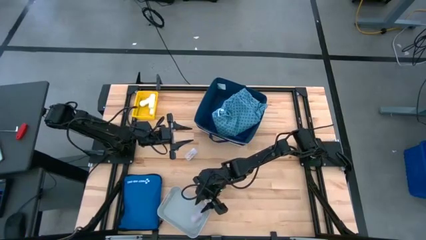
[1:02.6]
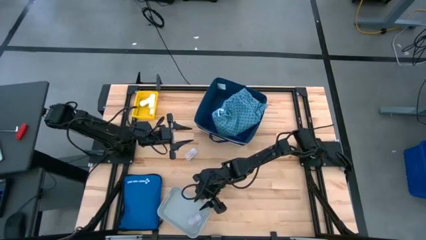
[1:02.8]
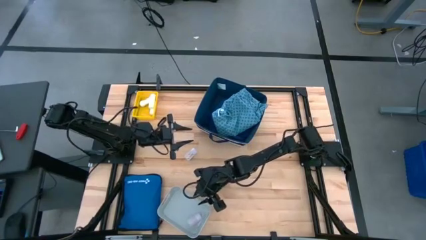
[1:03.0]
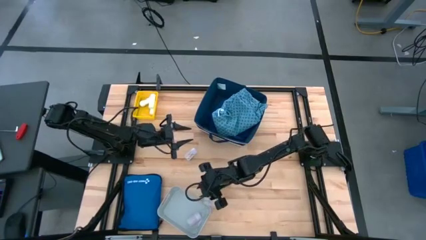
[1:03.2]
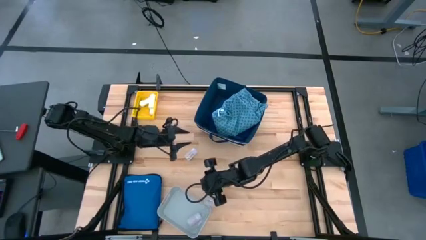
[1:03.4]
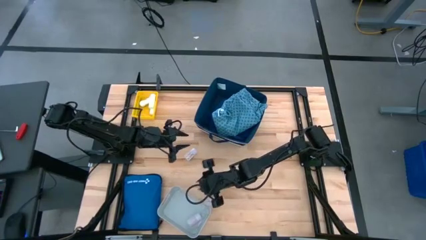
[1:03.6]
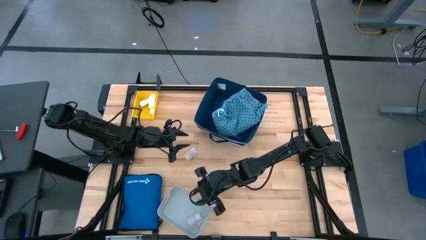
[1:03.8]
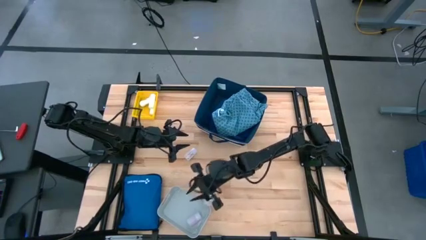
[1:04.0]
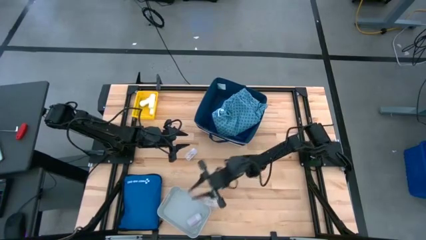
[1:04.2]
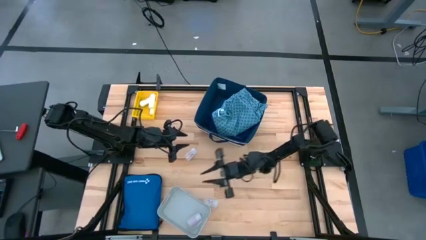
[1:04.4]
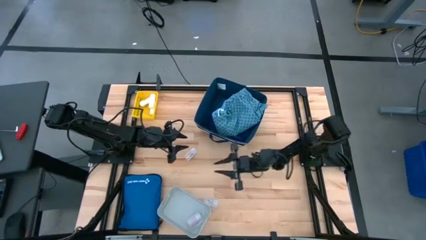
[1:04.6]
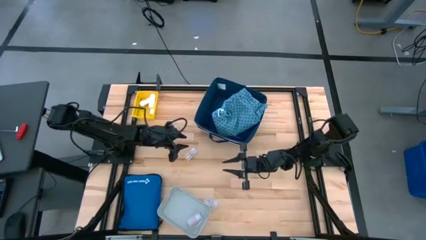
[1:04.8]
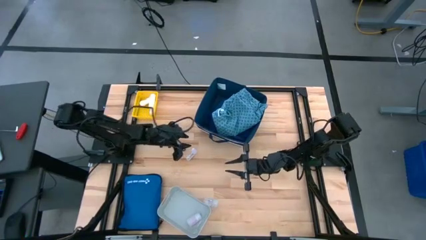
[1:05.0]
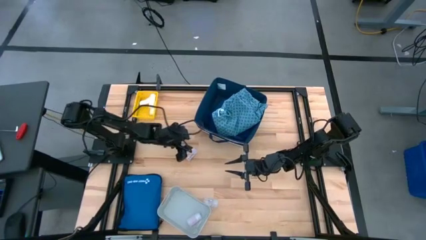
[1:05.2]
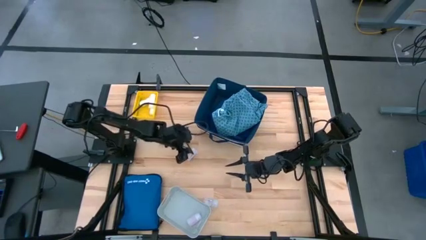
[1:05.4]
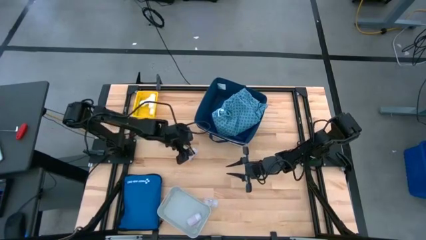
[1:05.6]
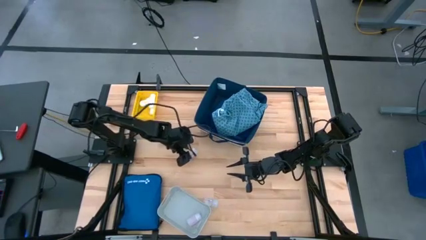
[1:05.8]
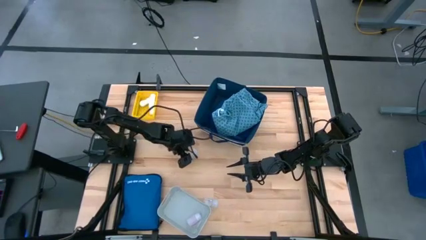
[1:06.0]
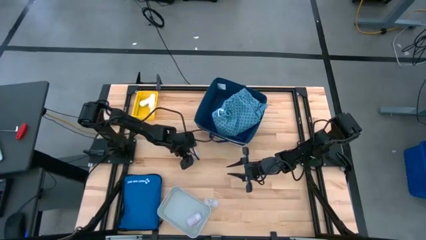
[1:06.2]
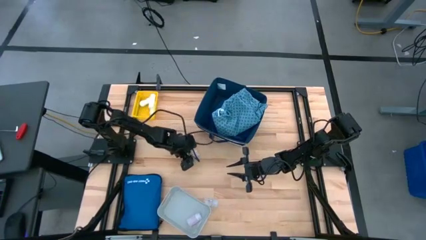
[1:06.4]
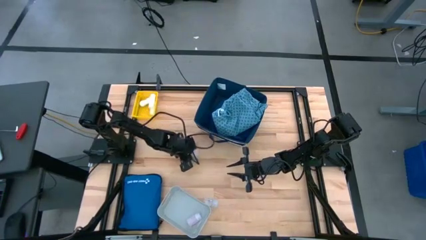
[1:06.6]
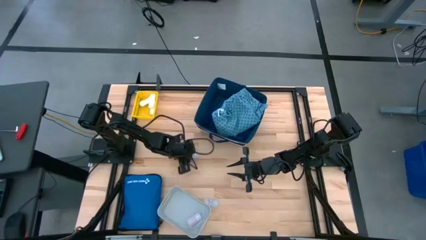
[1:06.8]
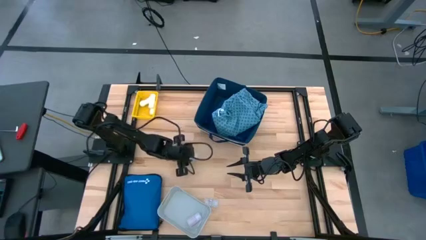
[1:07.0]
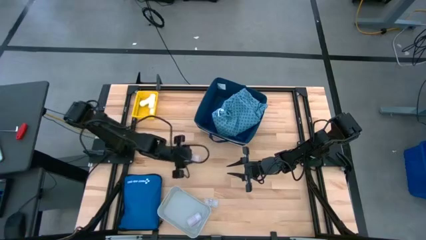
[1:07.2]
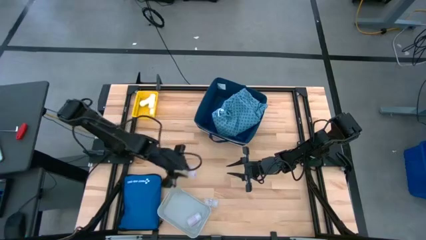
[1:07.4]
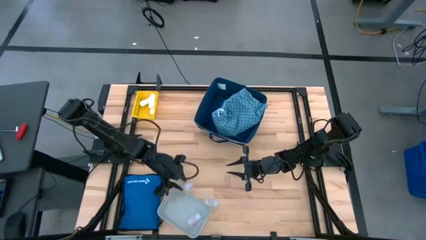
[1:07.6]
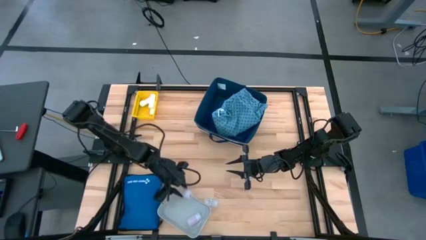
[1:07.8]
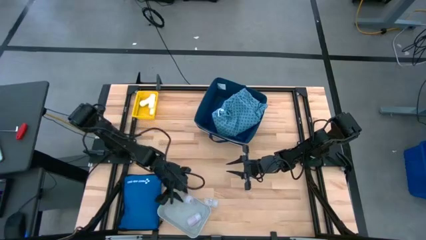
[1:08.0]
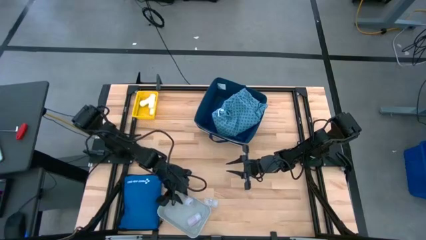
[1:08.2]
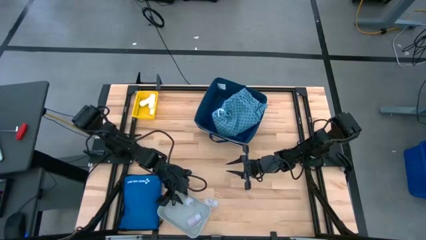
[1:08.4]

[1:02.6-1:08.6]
Task: Pick & place medical supplies in basket/bin
Put the top transparent pill bottle into the gray bin

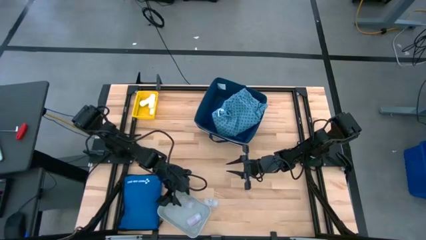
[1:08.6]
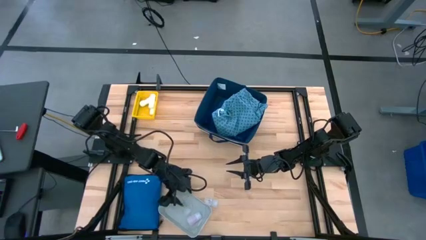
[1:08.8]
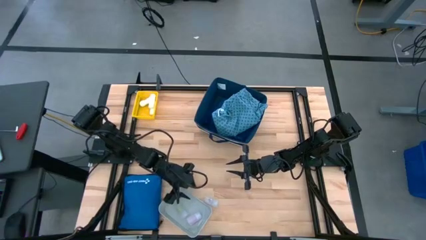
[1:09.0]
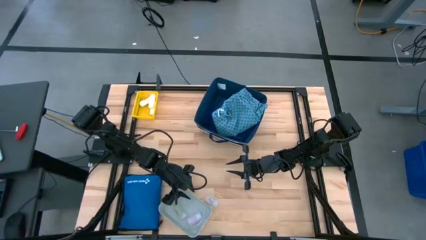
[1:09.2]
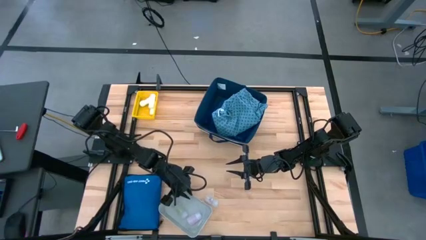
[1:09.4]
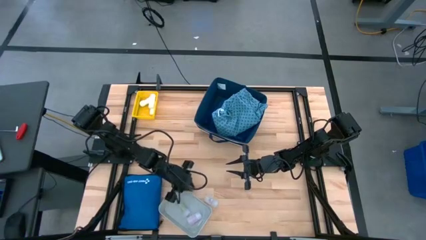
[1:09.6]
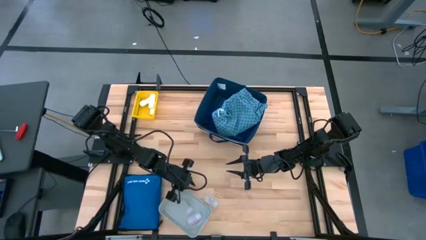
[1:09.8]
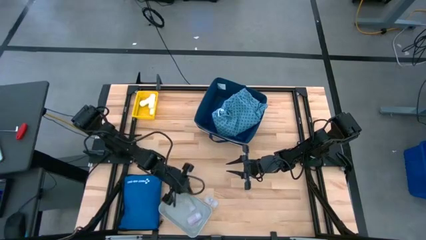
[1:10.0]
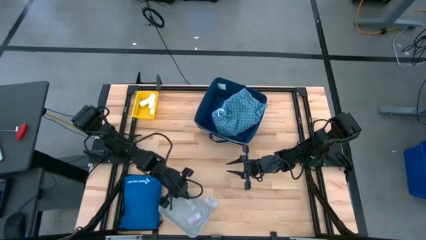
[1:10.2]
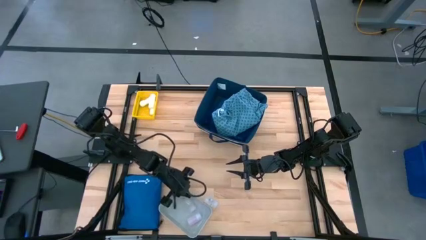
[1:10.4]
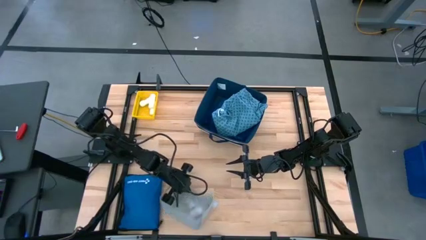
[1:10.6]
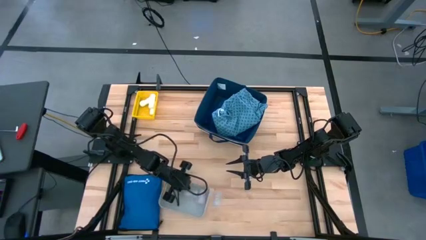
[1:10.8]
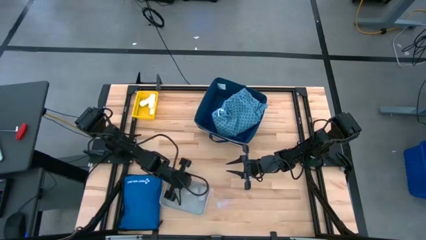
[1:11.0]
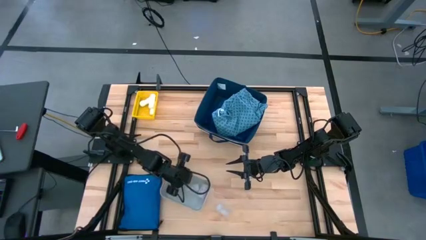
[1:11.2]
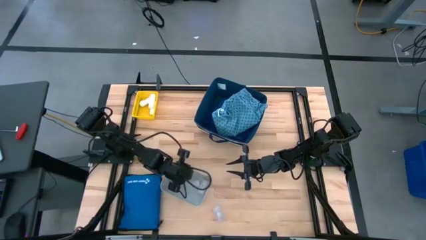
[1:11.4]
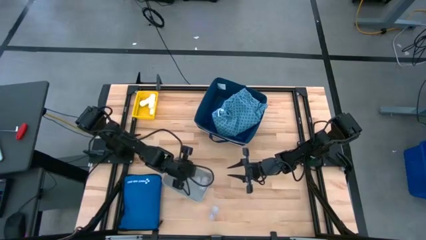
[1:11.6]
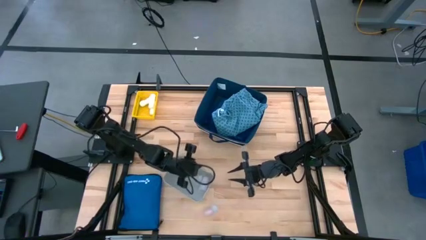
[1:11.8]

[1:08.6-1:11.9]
Move the gray bin

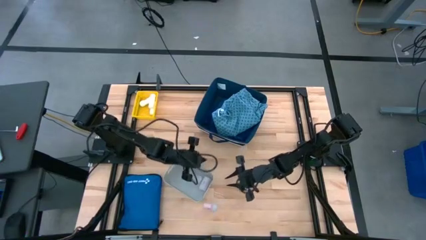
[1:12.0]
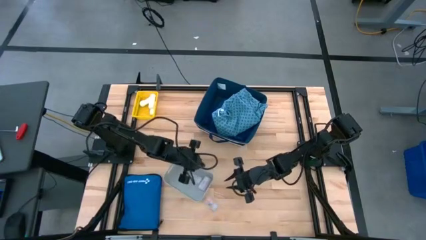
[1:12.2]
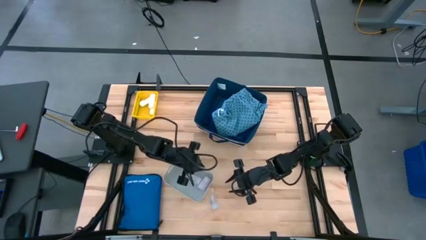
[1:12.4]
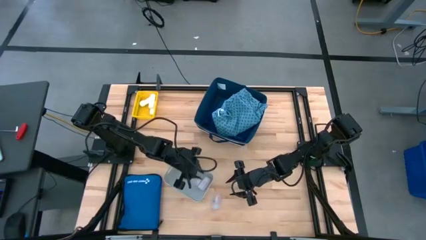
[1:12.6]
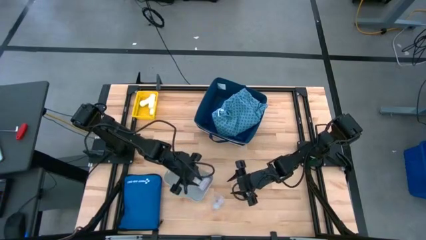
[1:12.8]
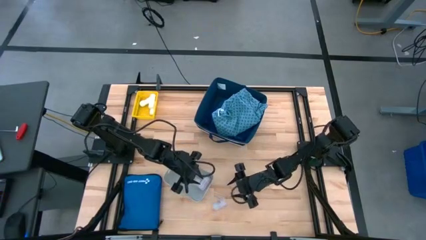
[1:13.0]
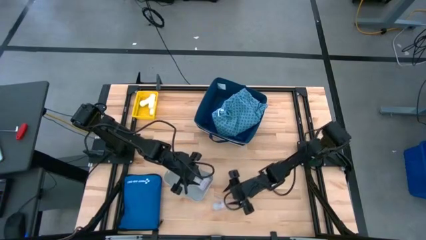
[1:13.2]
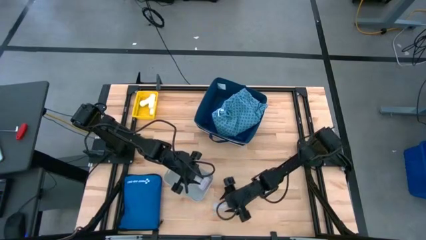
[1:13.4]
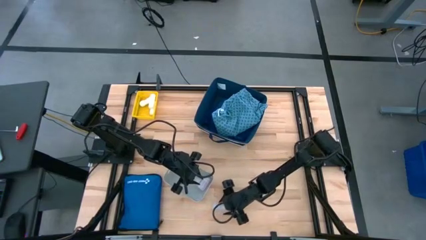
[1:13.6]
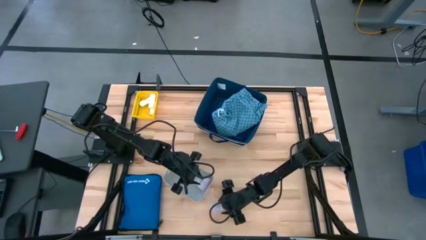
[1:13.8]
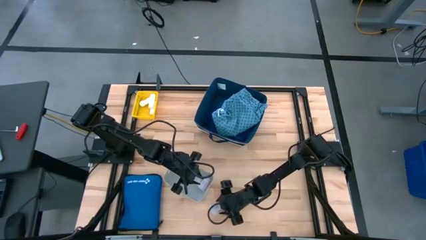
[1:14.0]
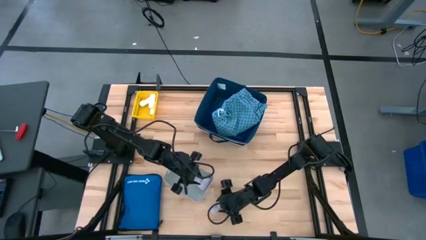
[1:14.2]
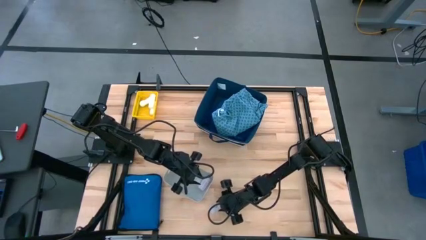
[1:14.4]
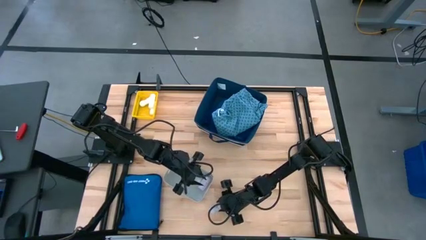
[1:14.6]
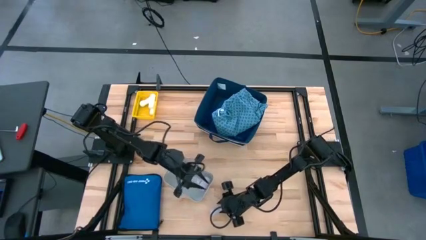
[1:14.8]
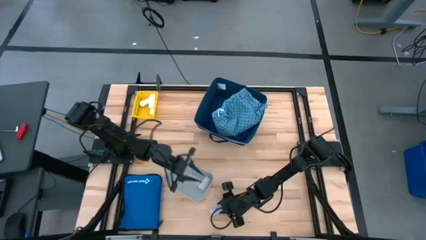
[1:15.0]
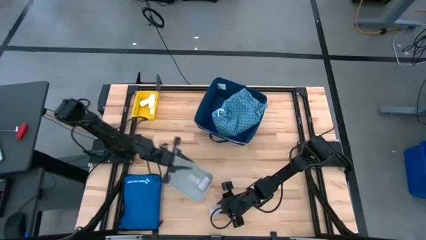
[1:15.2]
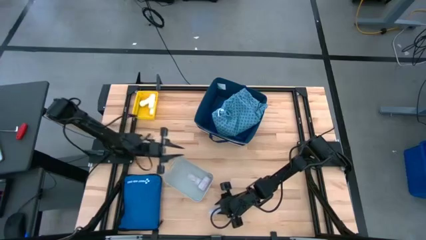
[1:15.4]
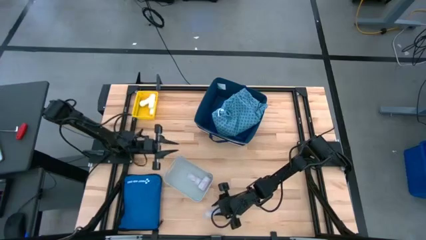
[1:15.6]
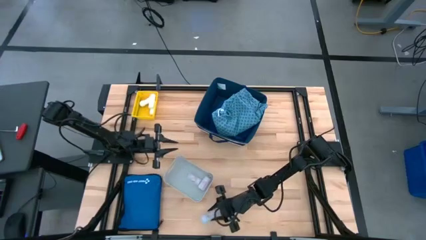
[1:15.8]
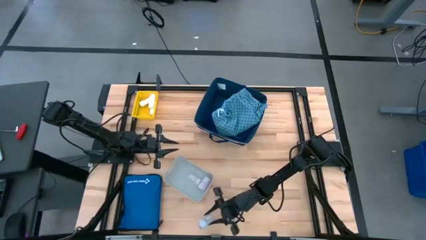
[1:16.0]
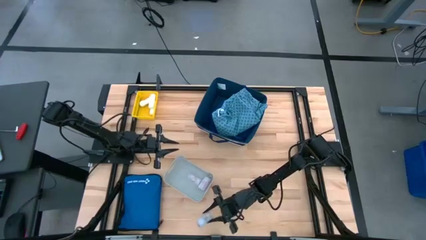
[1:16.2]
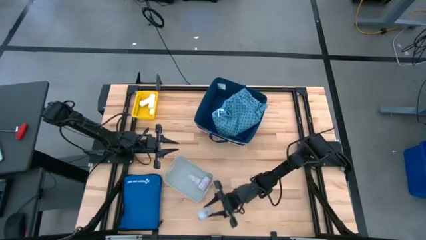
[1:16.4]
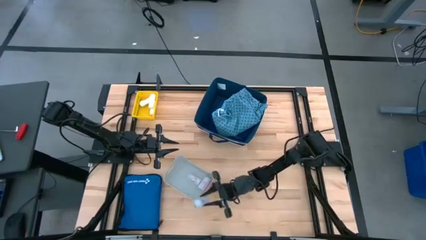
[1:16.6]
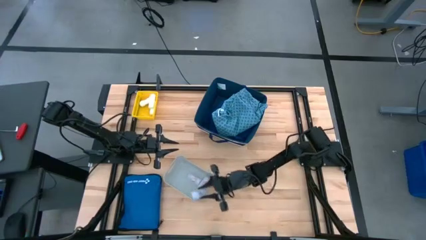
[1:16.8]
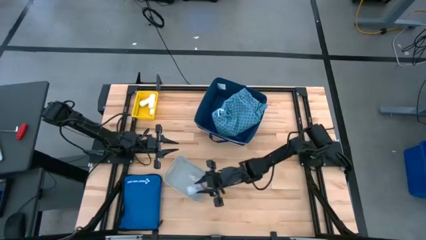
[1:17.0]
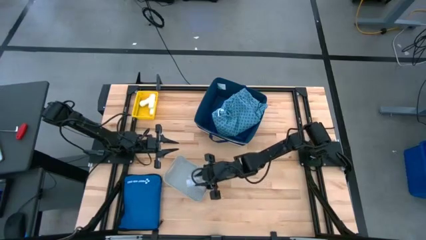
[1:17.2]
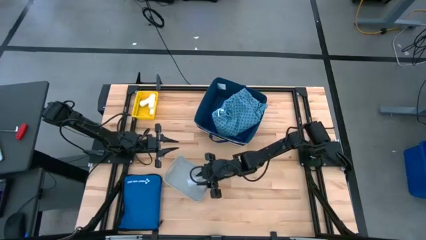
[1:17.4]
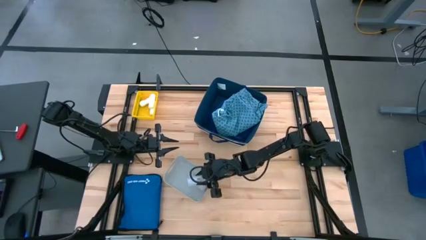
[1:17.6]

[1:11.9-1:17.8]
Put the transparent pill bottle into the gray bin

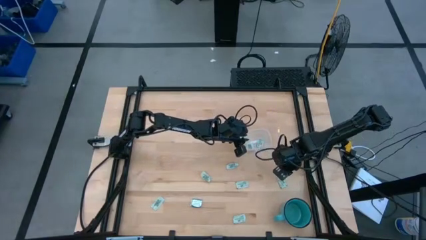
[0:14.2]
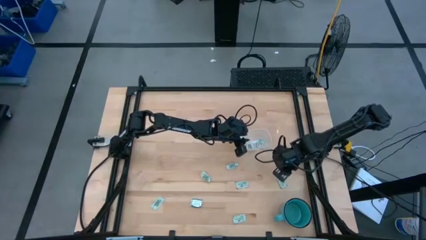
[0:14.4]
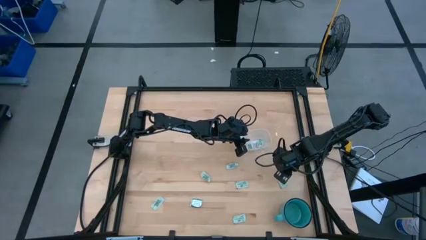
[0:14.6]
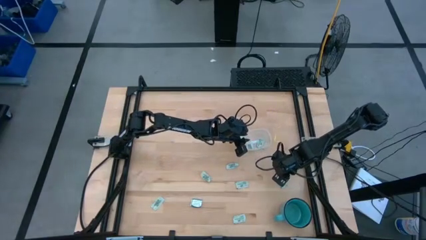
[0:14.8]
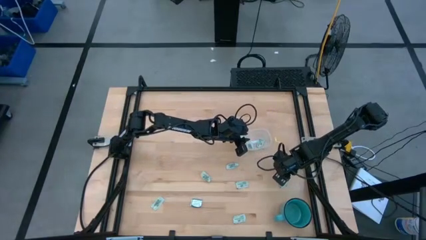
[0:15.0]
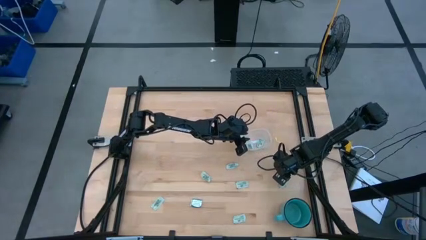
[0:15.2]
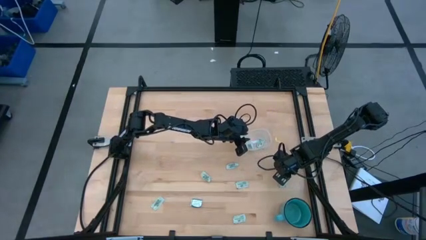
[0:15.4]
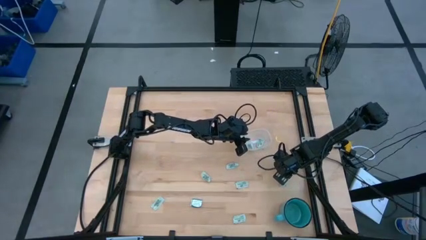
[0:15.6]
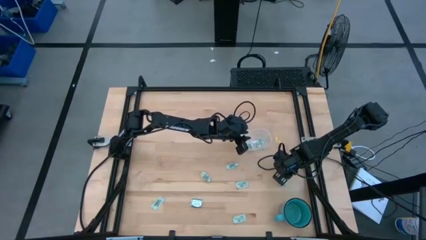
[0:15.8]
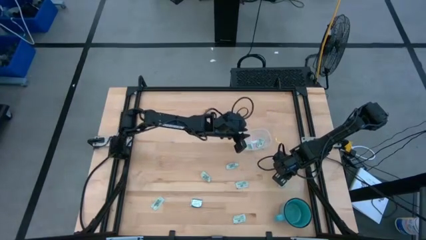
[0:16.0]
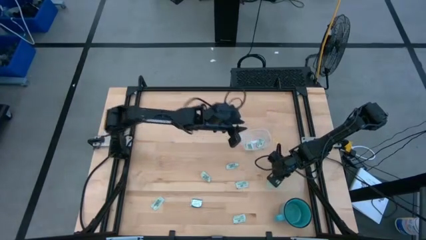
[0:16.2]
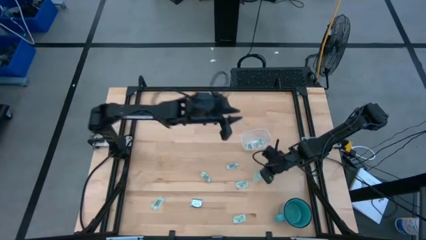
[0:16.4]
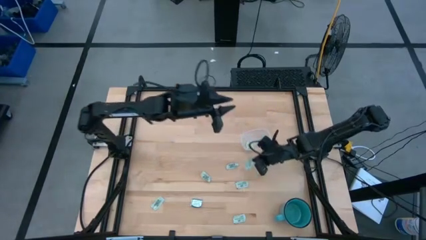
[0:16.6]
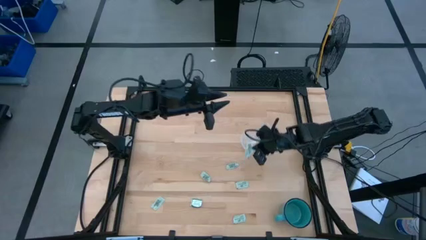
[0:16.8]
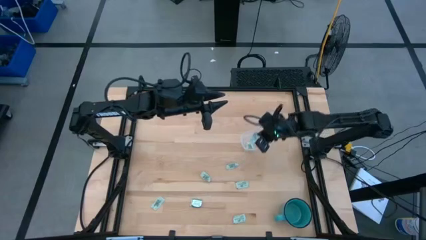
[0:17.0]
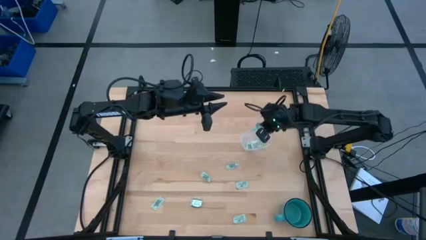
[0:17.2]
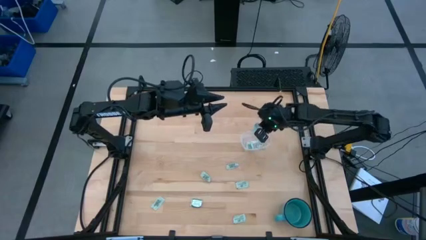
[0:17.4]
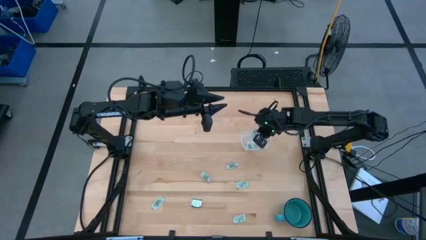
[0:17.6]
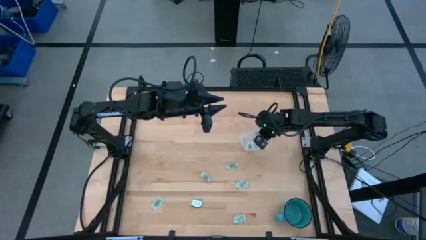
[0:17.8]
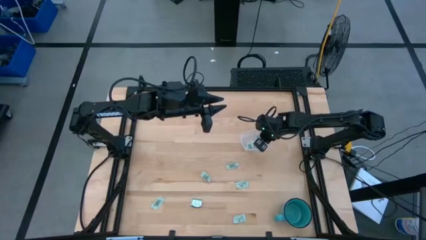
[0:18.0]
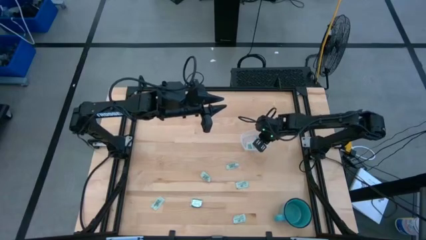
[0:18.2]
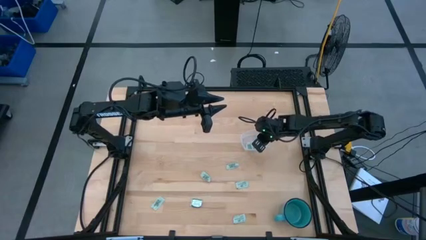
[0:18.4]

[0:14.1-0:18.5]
Task: Pick and place Stevia / Truvia into bins
Put the green stevia packet into the transparent bin
